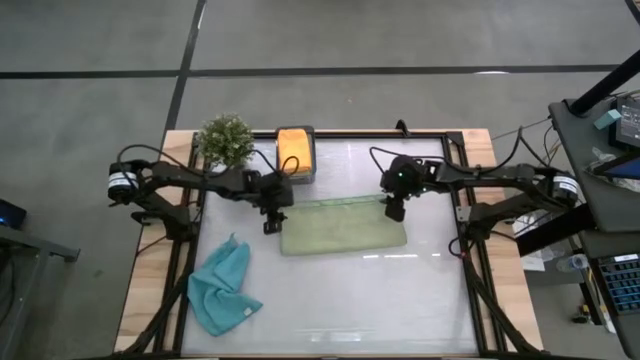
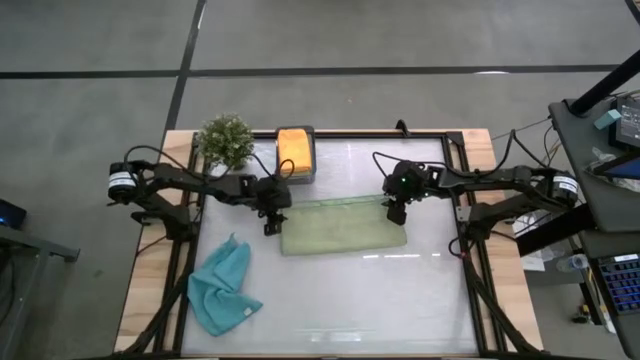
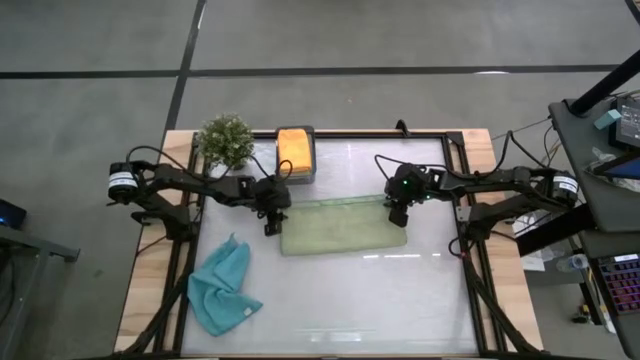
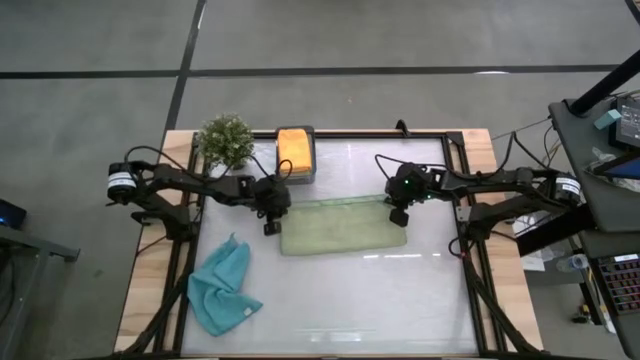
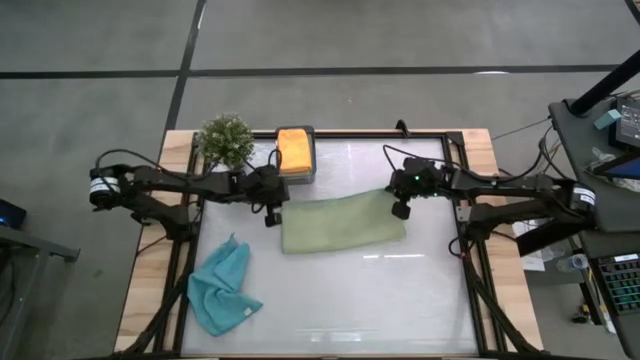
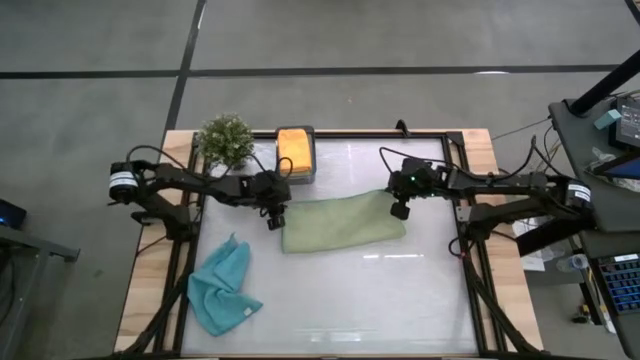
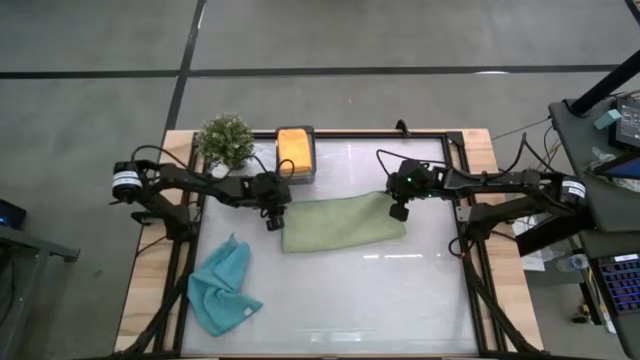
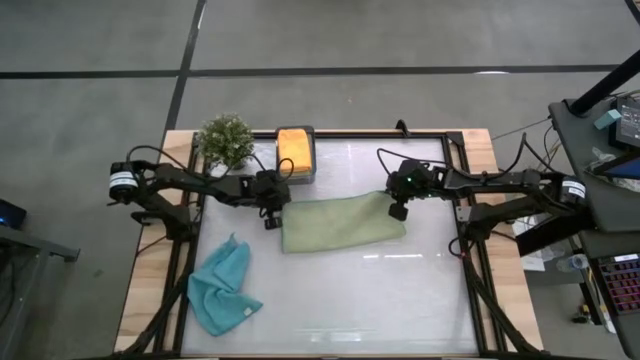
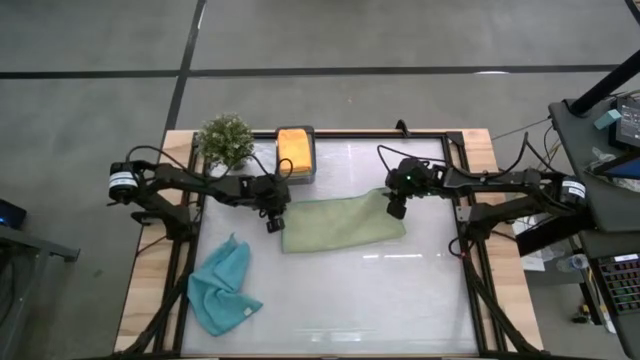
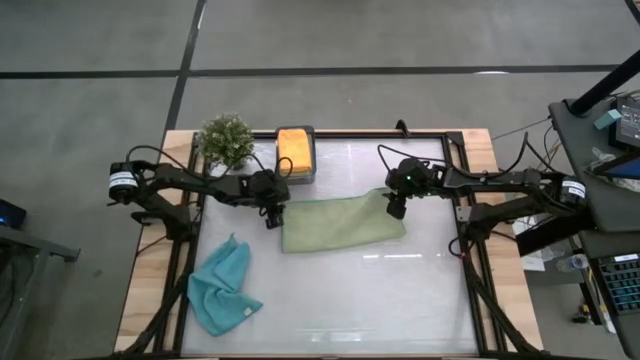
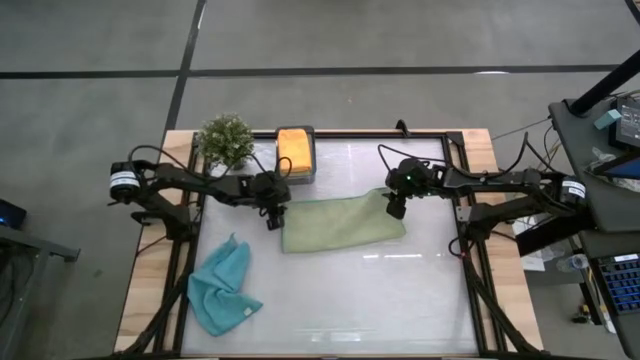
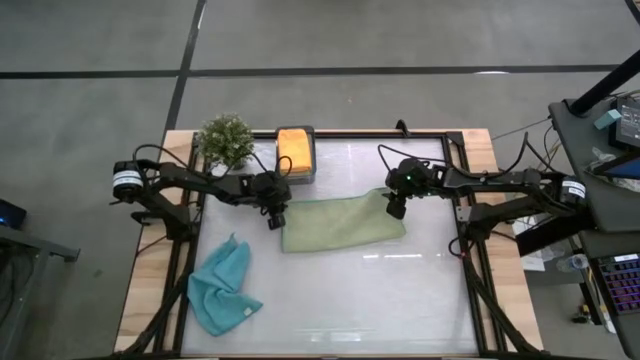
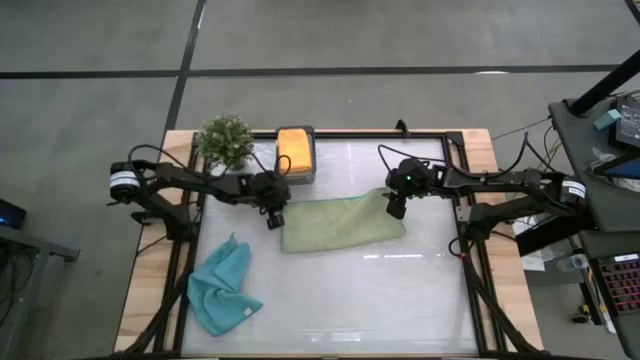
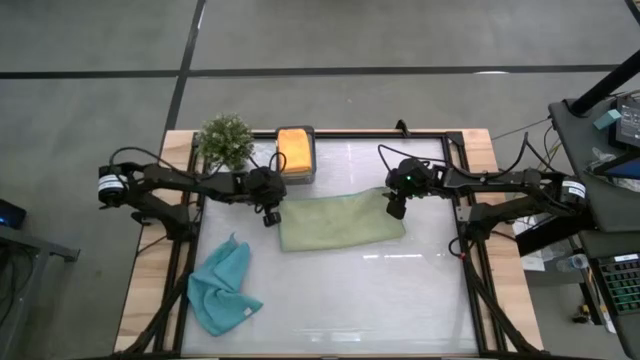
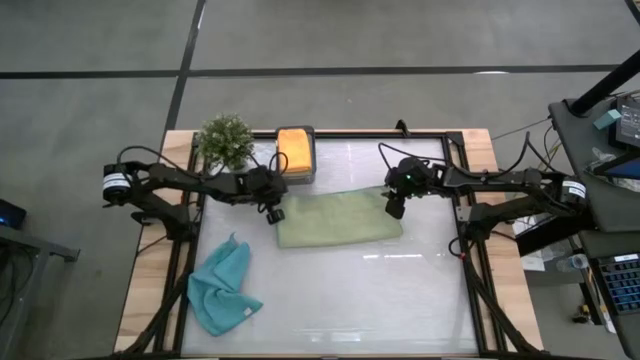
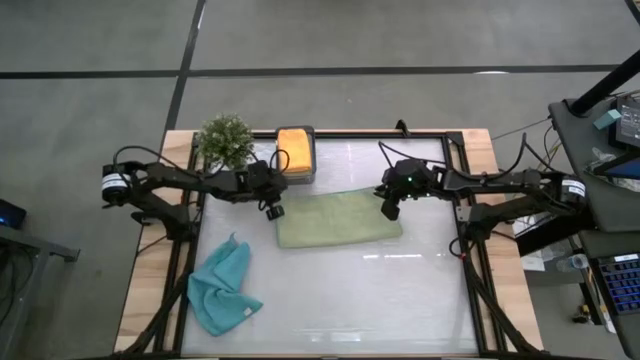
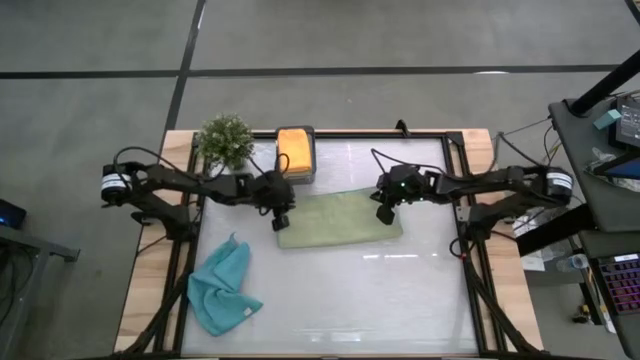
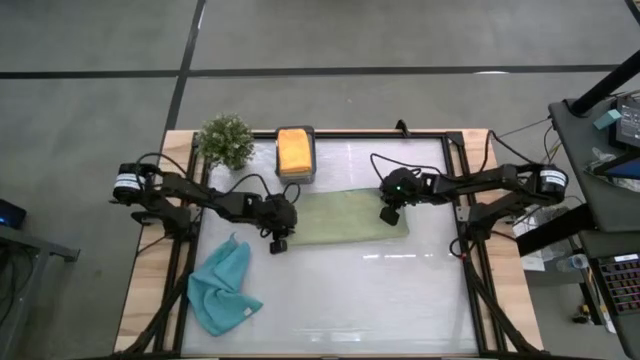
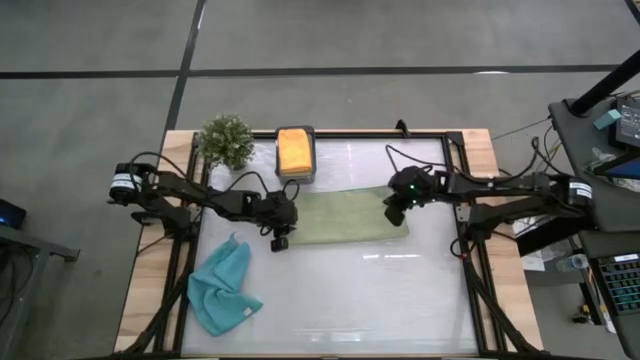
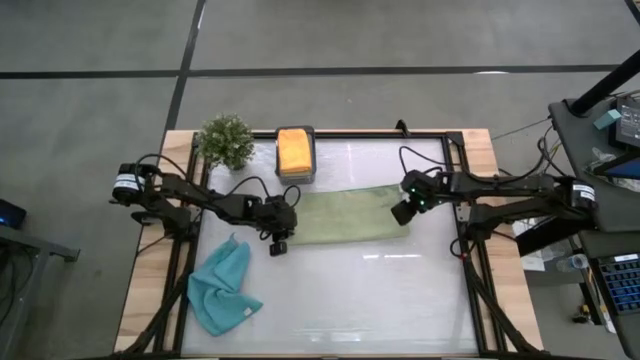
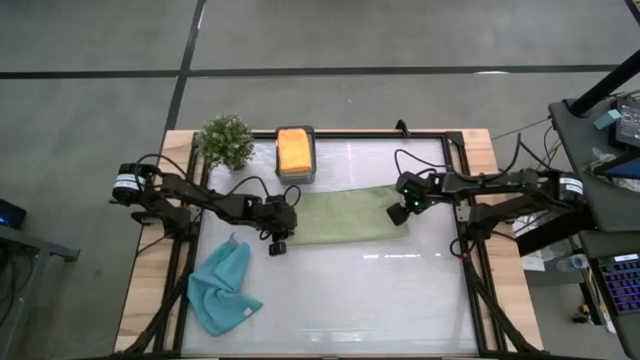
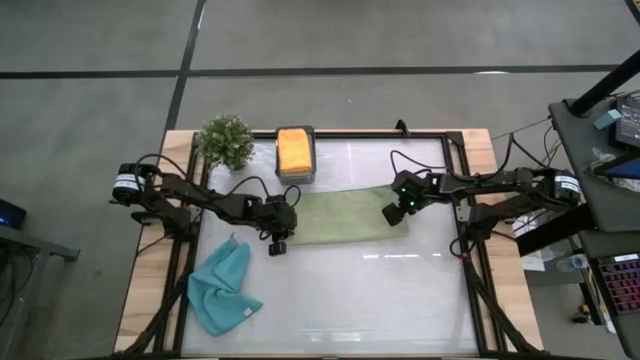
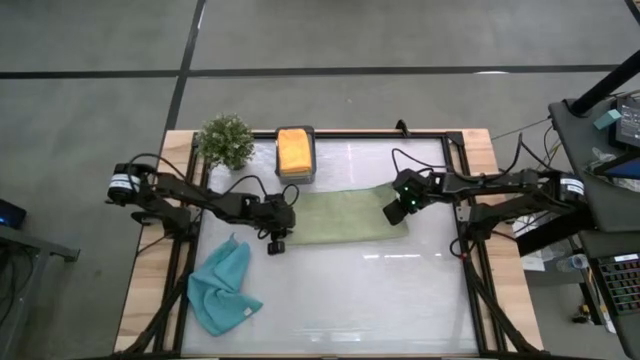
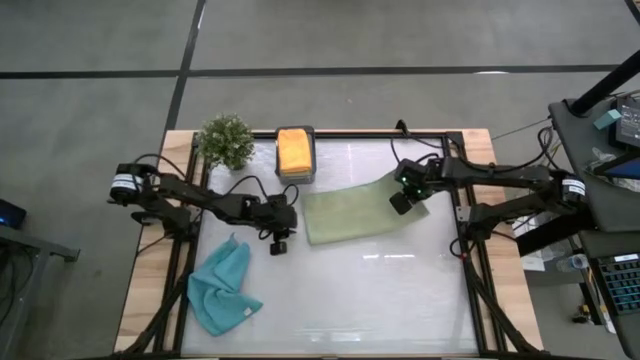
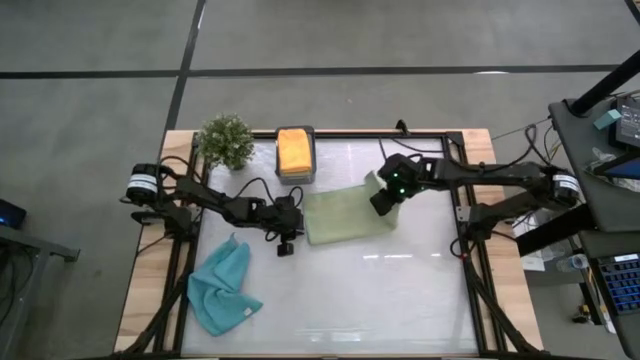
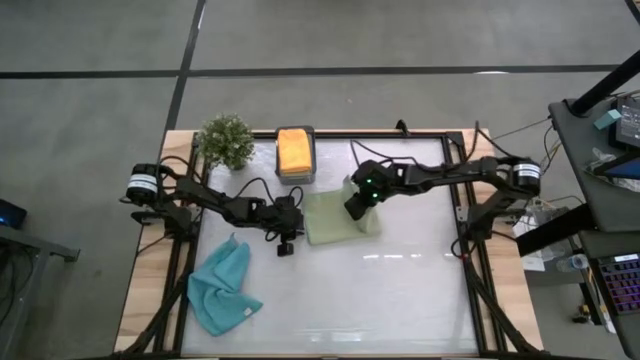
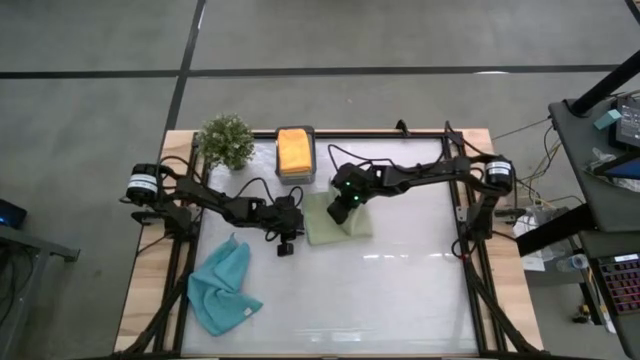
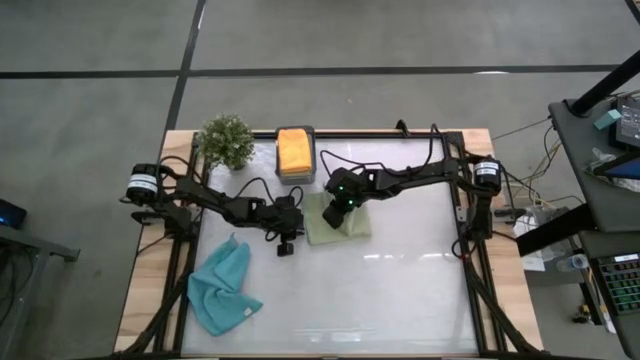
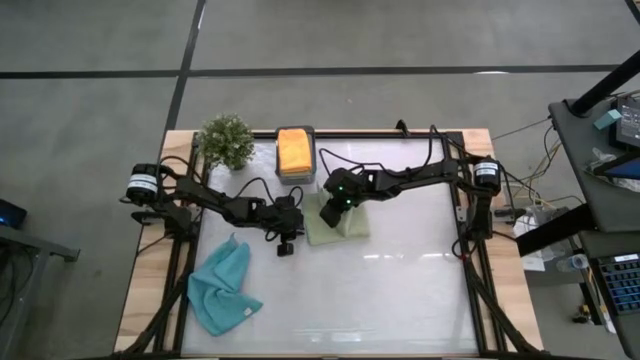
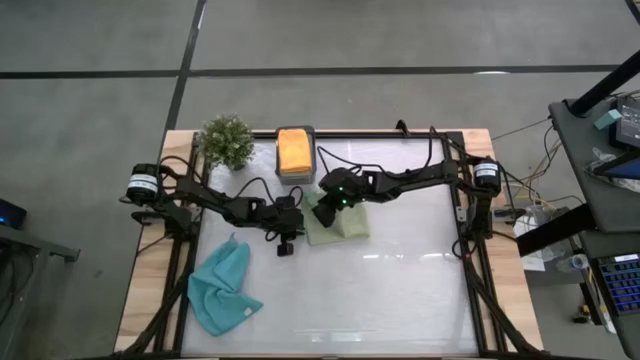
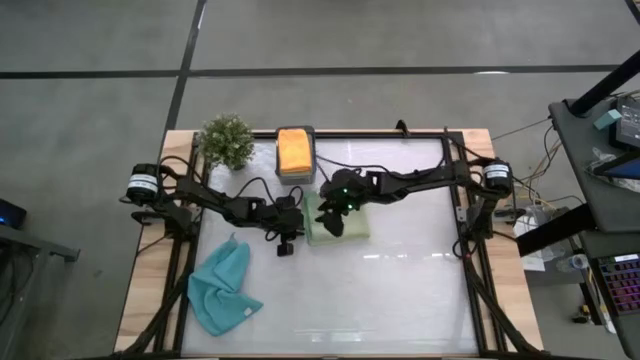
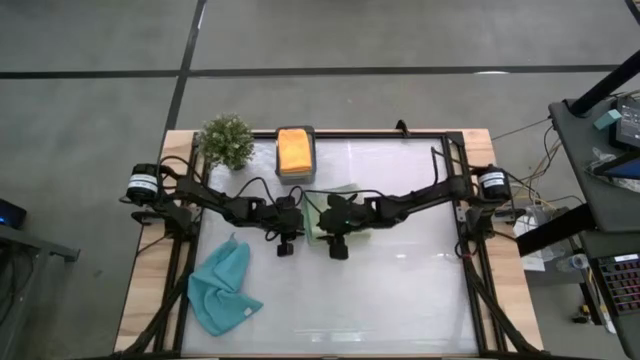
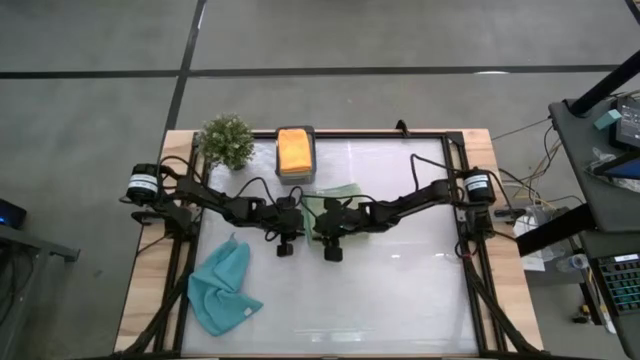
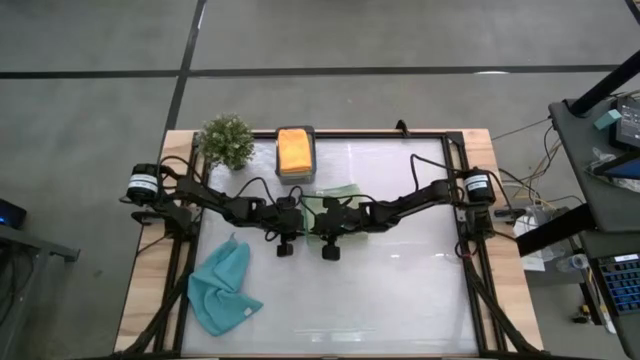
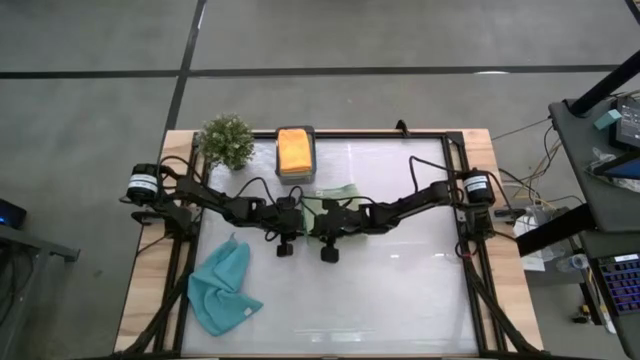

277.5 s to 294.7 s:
Task: Fold microfiber towels
Fold the green towel
